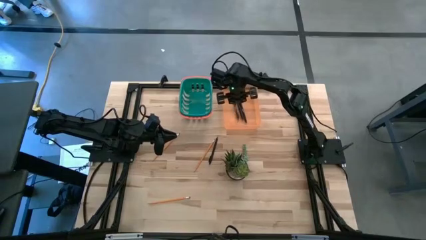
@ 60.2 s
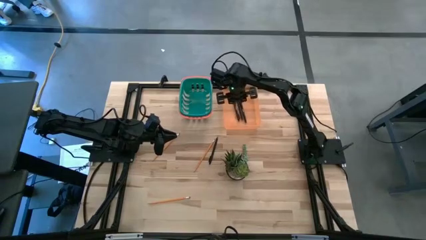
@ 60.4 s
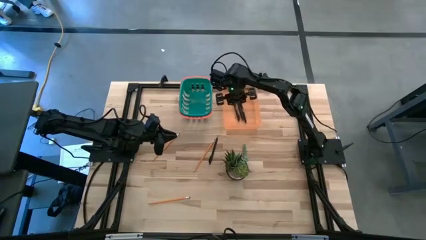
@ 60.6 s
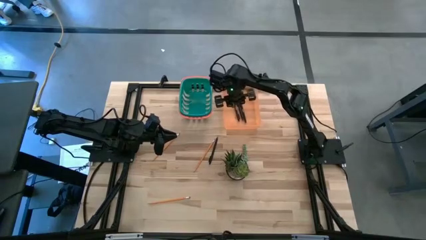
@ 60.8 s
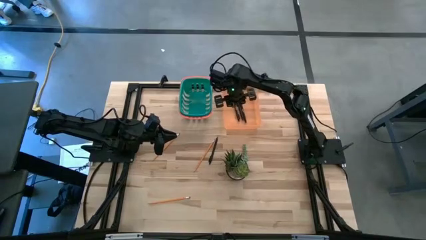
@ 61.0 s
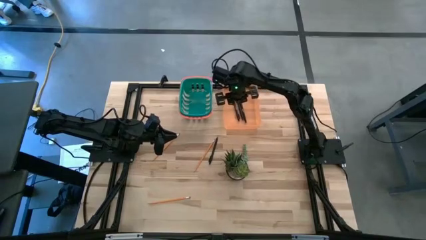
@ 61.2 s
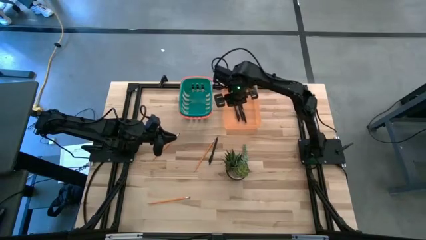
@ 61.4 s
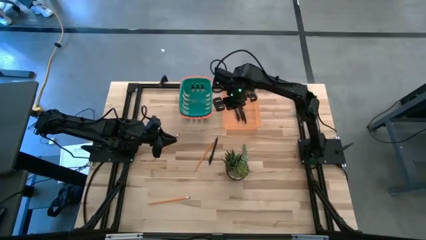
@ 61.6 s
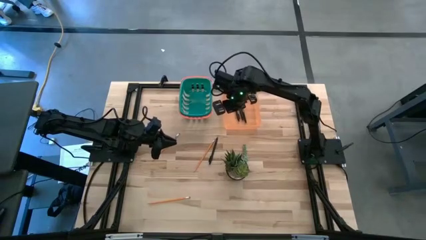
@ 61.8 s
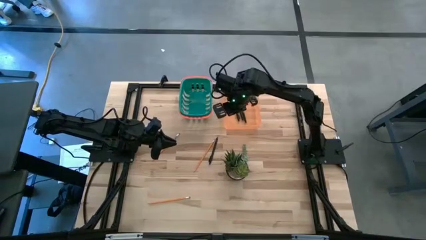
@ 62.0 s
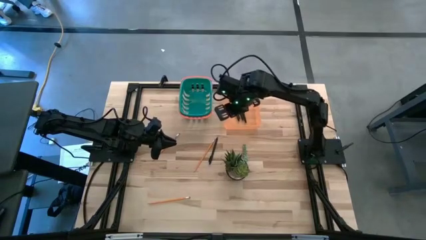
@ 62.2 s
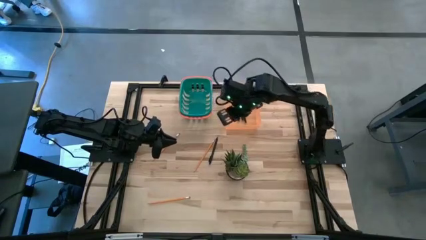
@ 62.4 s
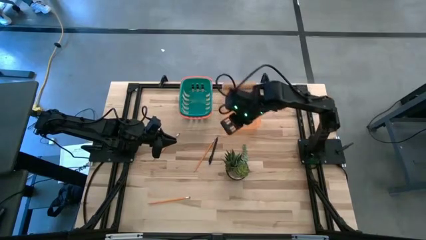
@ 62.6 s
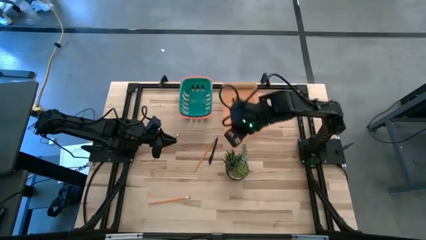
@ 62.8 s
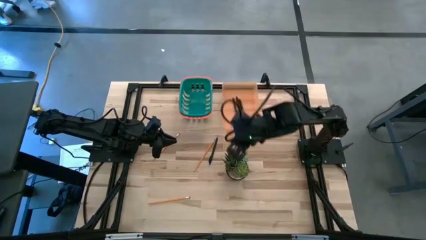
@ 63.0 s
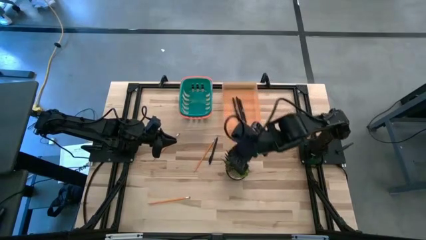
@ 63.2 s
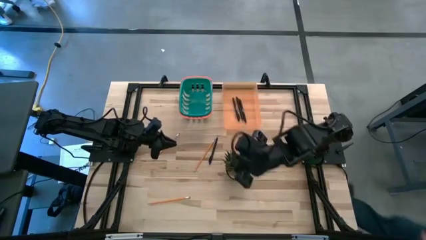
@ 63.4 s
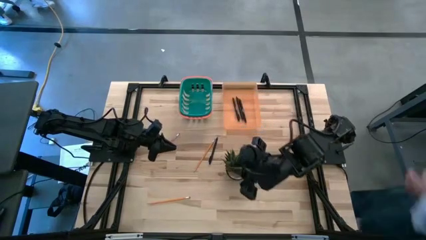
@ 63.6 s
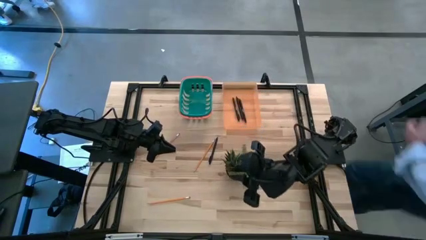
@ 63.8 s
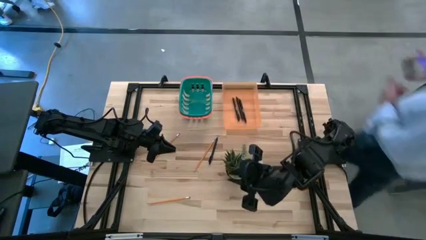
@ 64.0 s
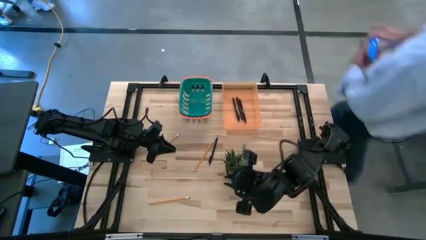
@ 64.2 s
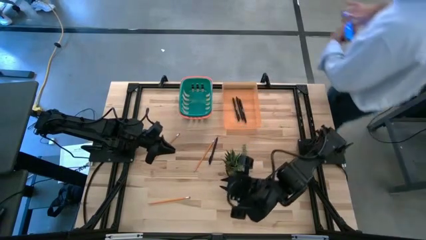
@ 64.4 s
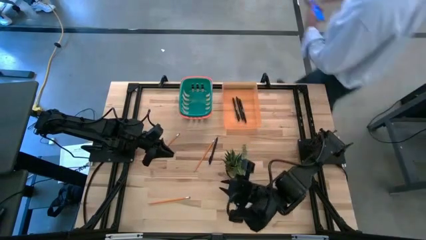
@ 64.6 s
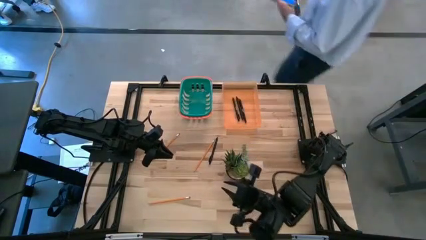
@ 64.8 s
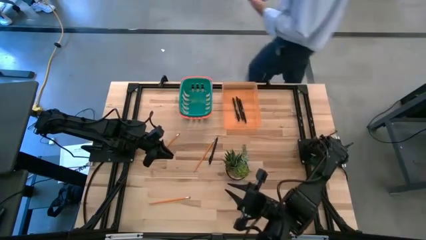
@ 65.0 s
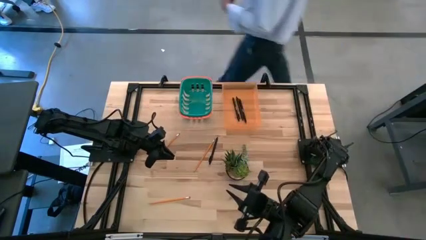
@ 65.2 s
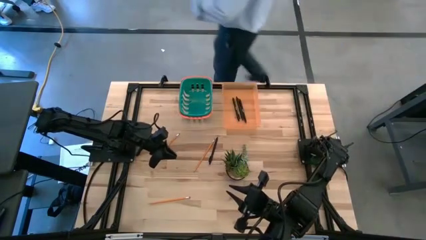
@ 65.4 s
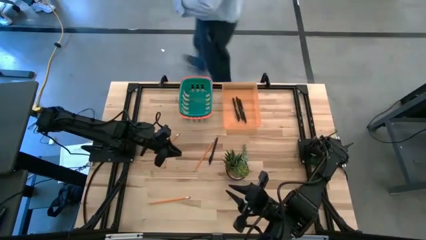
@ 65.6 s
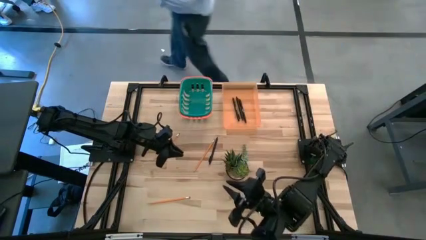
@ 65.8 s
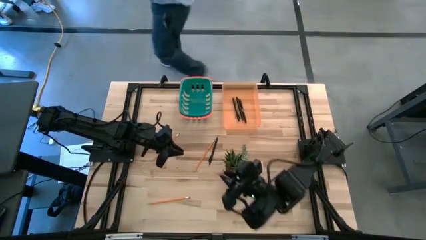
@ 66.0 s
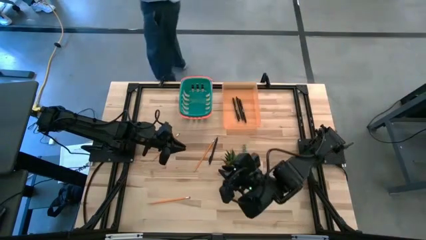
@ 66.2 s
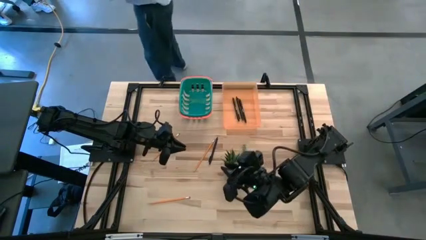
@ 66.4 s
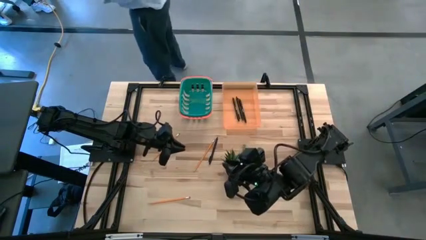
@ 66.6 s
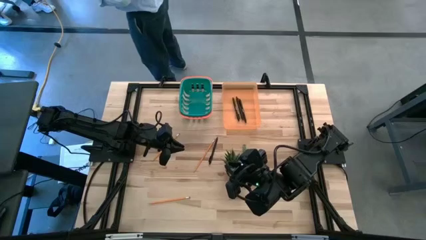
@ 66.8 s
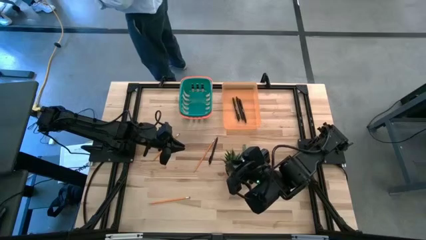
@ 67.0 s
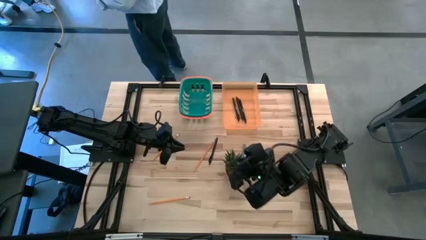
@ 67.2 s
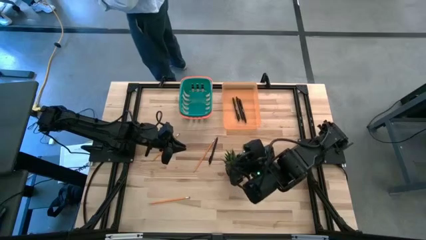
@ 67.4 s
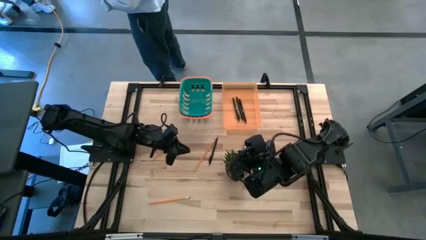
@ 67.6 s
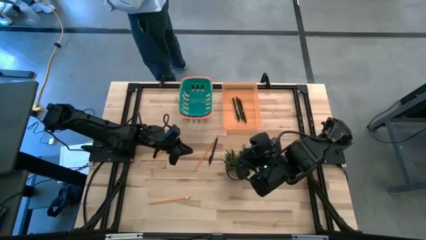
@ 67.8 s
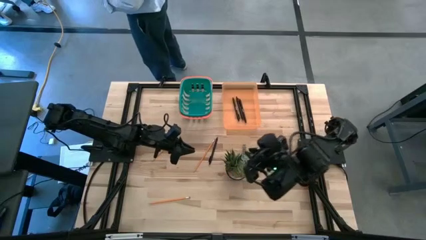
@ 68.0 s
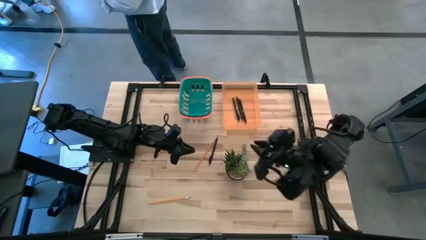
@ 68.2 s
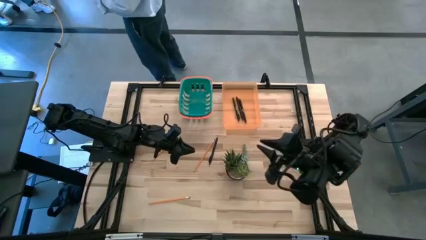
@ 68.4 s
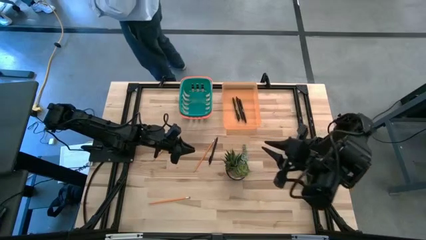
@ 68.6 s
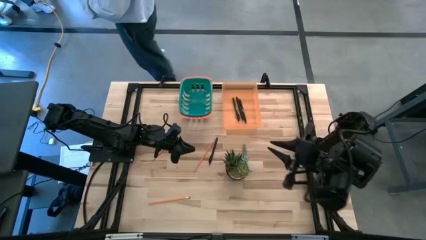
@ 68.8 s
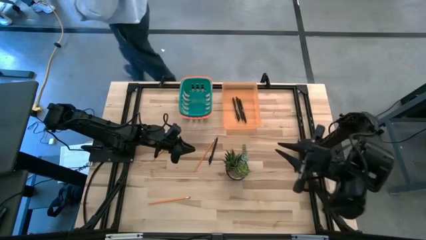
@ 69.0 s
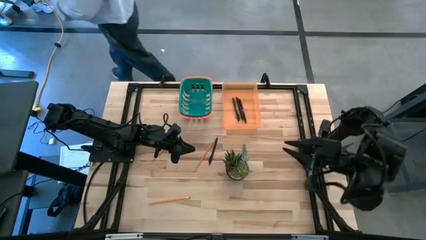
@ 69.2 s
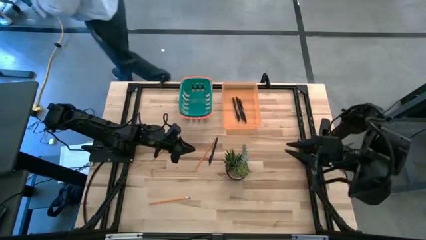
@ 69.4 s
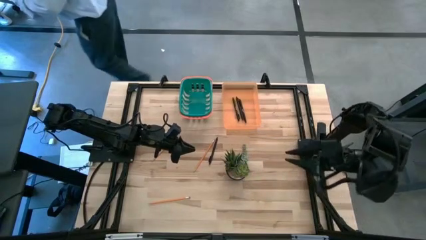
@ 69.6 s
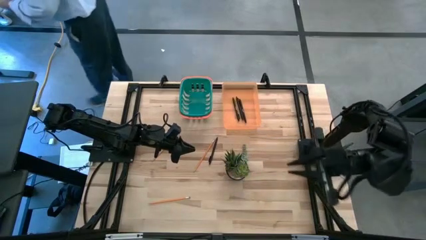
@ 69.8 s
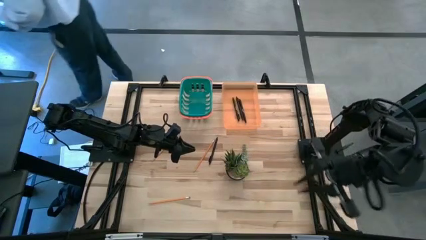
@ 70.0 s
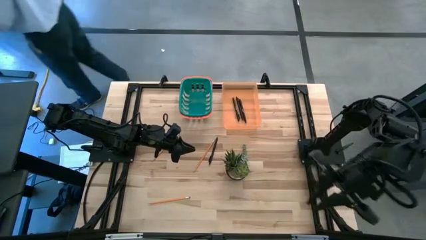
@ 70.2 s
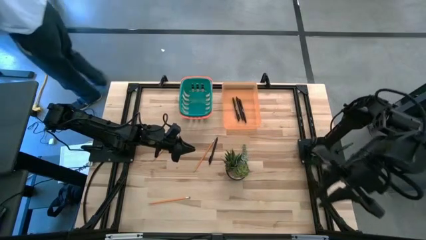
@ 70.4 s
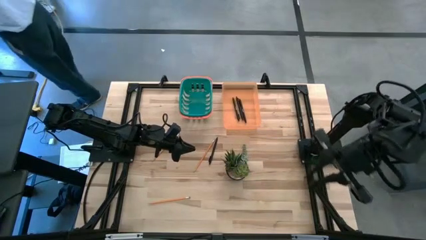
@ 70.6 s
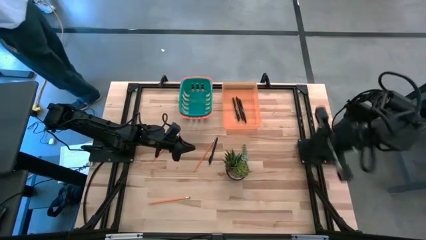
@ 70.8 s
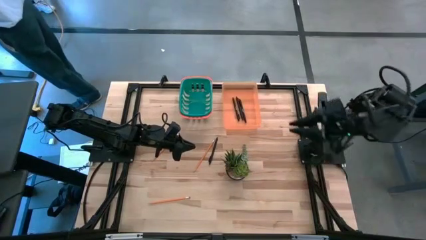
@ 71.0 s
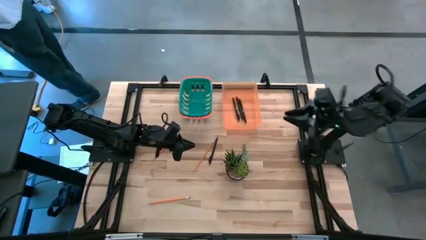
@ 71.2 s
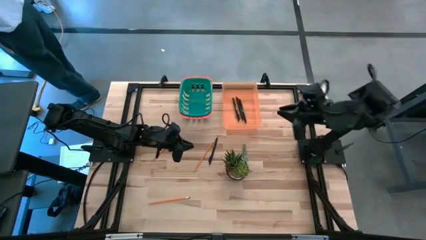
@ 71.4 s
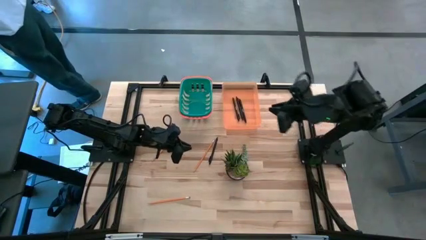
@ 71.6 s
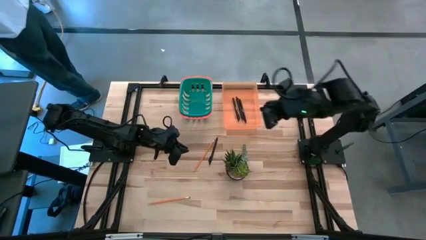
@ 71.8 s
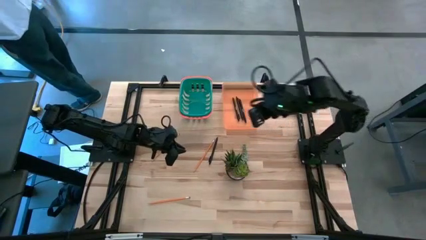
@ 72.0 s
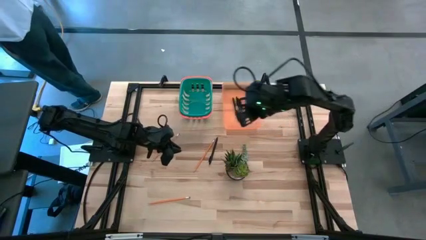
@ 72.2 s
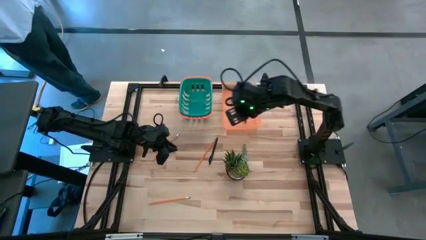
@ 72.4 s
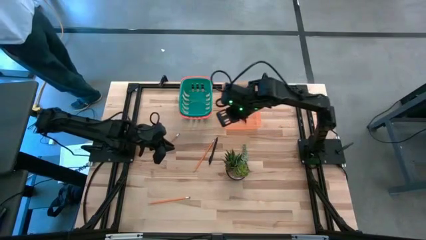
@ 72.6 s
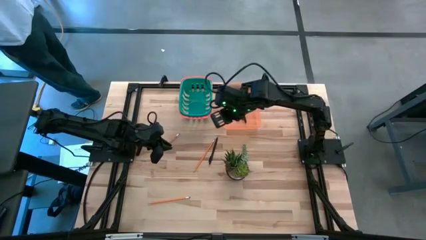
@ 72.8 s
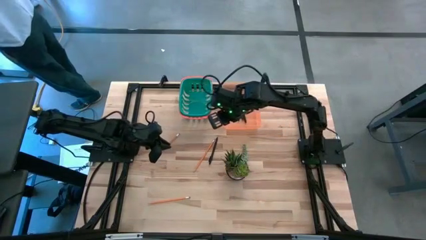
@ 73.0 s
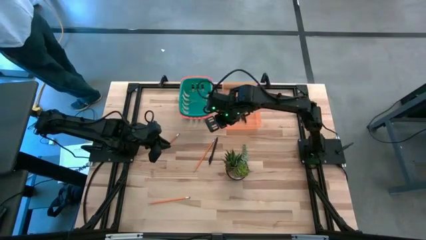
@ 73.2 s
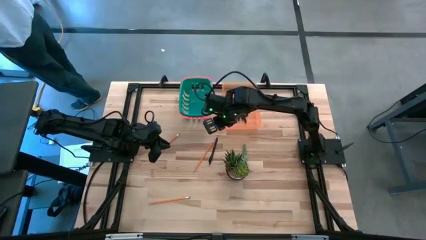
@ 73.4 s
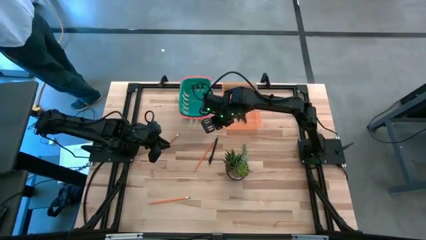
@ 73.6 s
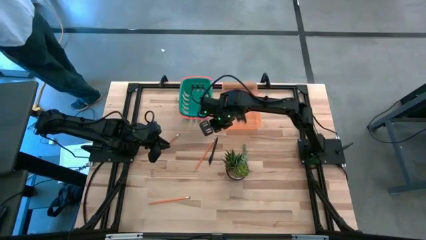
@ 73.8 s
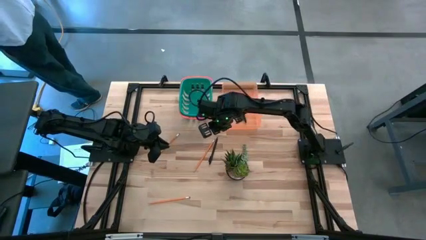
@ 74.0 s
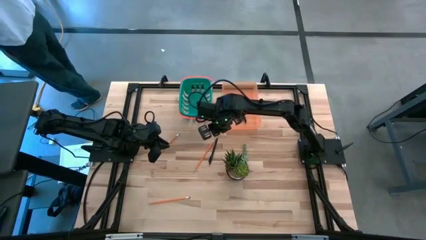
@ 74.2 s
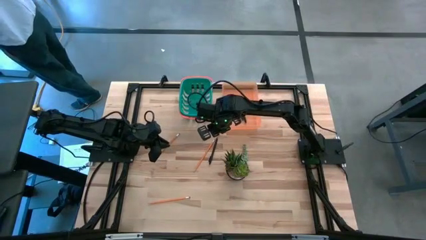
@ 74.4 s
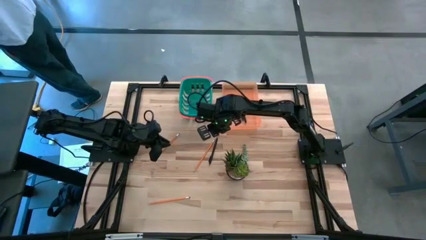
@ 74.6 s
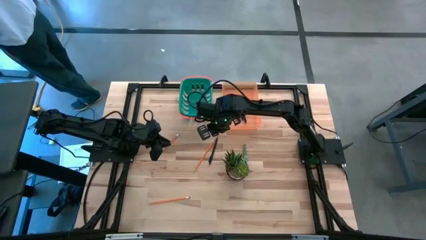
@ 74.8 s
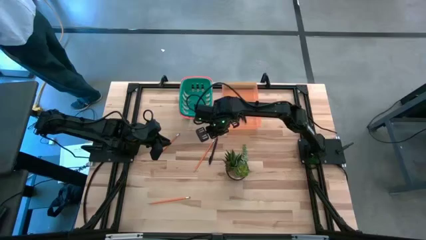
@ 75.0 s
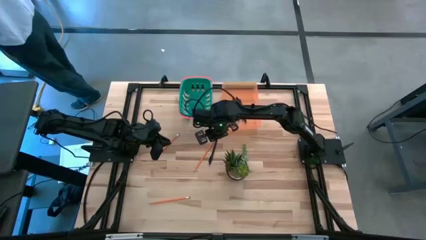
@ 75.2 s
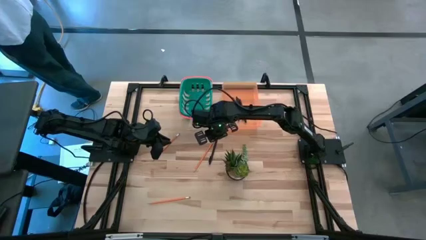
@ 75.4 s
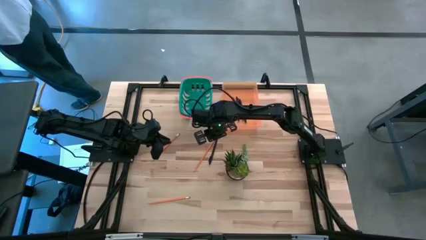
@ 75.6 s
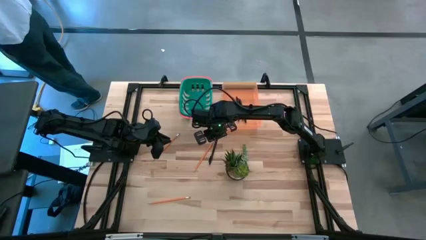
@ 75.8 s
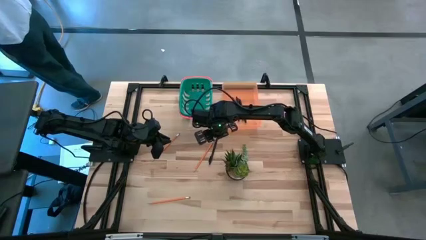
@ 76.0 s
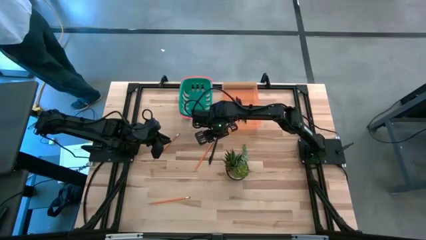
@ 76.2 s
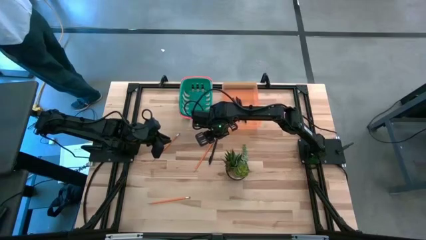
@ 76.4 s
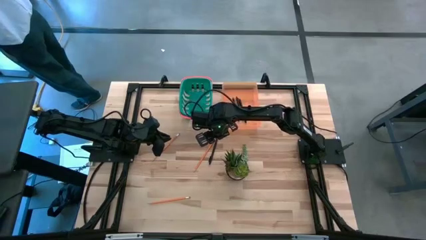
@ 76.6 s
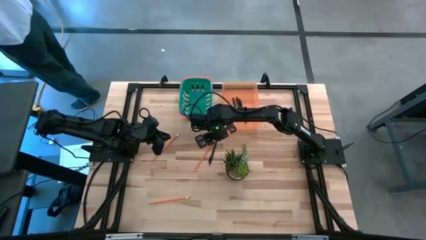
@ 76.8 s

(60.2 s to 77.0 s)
Task: Sort pens & pencils
Put the black ballpoint pen into the orange bin
